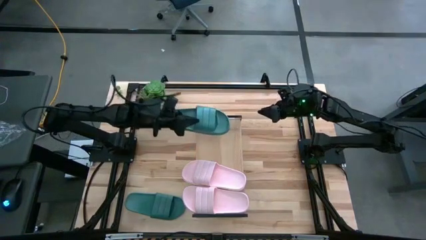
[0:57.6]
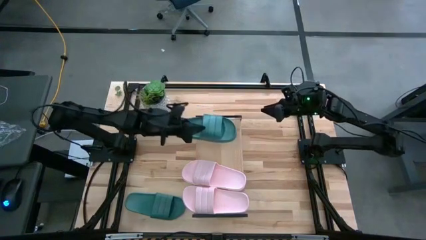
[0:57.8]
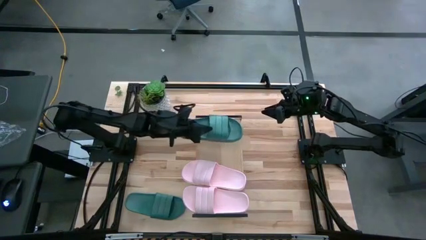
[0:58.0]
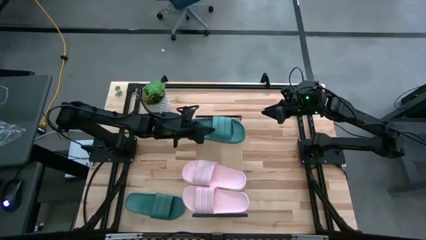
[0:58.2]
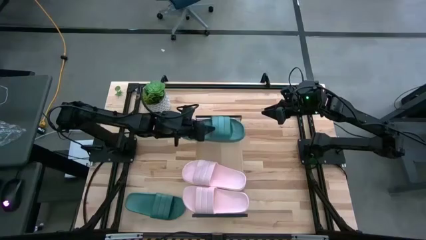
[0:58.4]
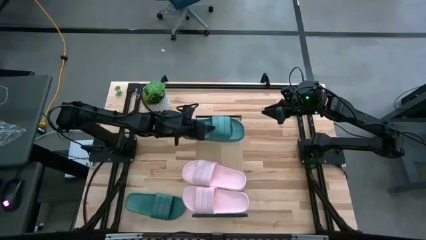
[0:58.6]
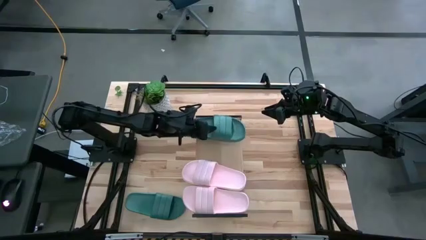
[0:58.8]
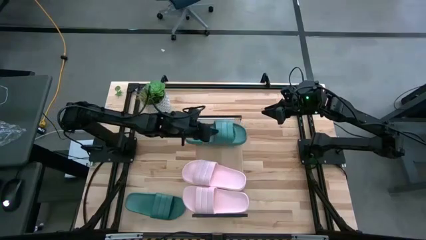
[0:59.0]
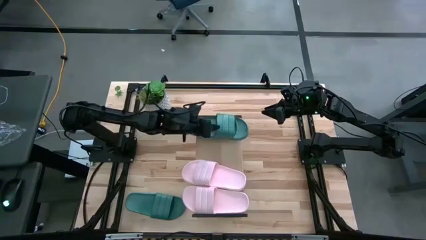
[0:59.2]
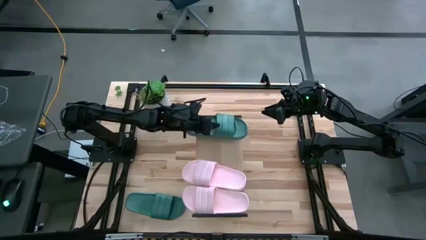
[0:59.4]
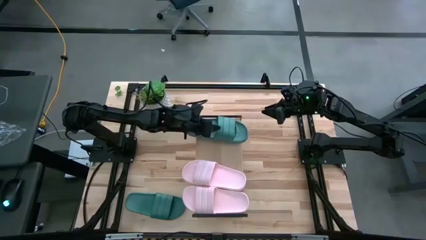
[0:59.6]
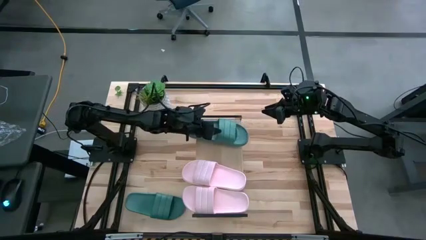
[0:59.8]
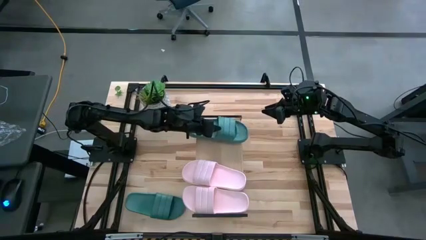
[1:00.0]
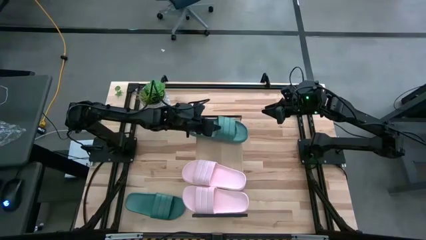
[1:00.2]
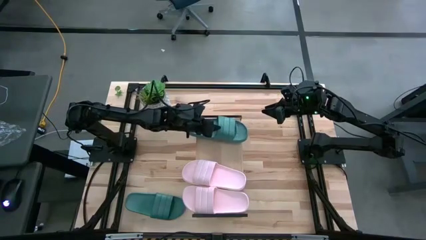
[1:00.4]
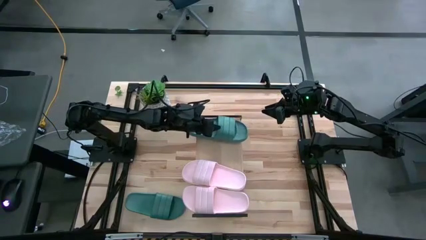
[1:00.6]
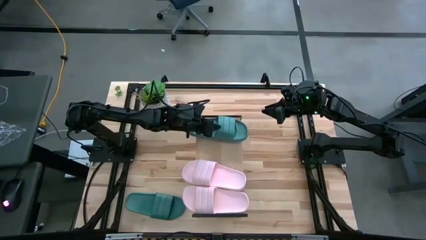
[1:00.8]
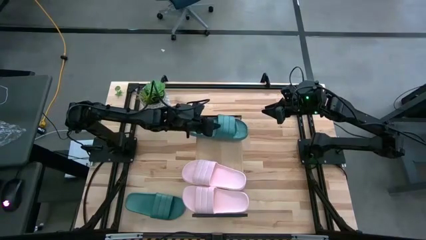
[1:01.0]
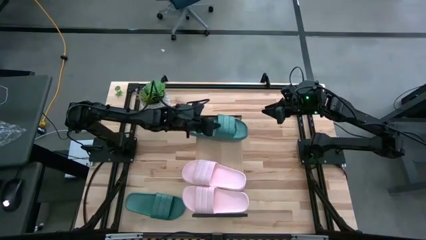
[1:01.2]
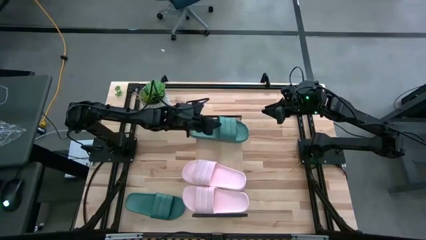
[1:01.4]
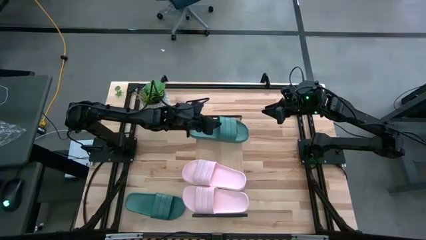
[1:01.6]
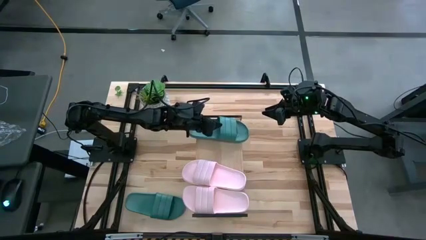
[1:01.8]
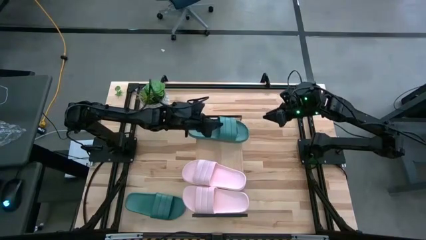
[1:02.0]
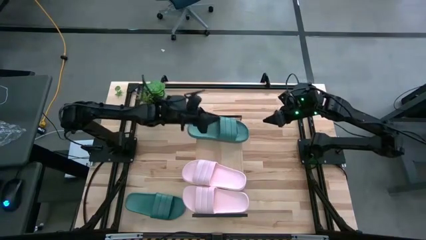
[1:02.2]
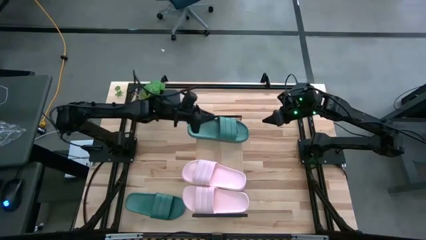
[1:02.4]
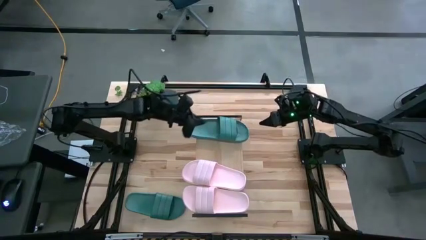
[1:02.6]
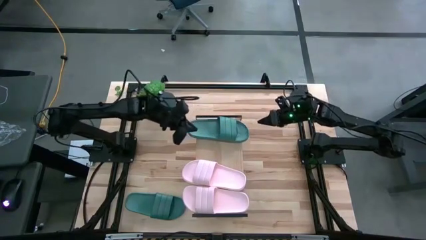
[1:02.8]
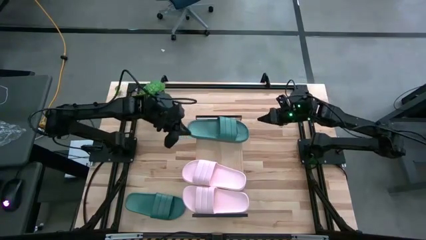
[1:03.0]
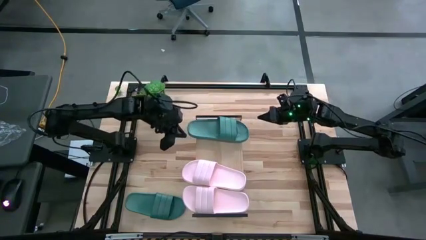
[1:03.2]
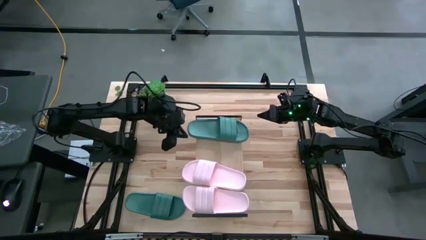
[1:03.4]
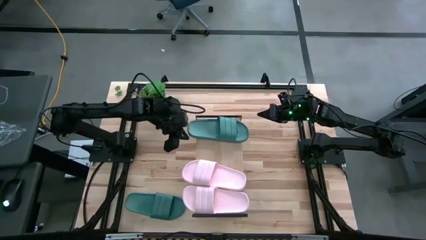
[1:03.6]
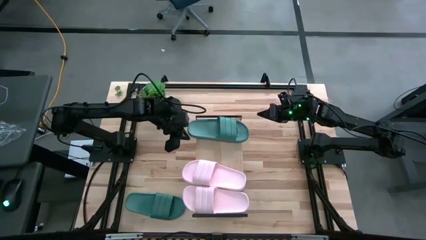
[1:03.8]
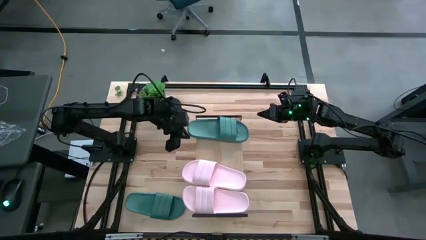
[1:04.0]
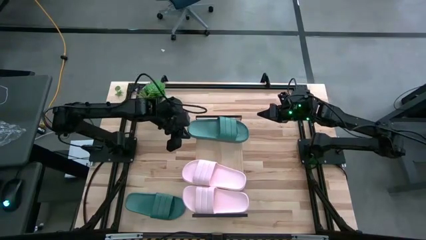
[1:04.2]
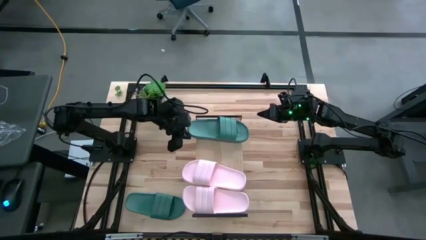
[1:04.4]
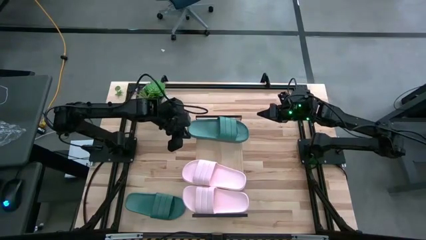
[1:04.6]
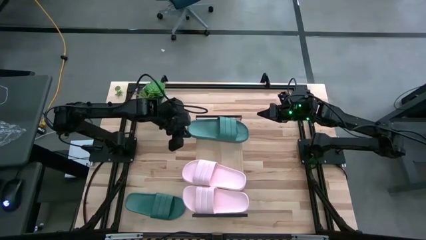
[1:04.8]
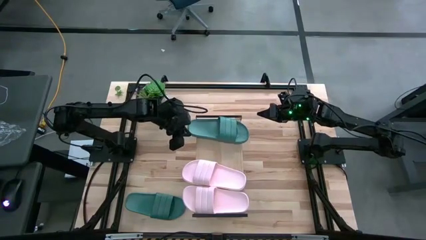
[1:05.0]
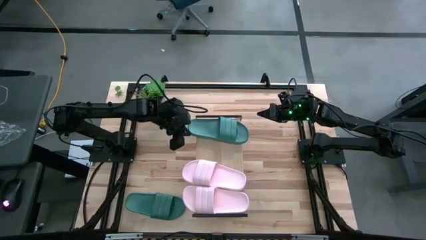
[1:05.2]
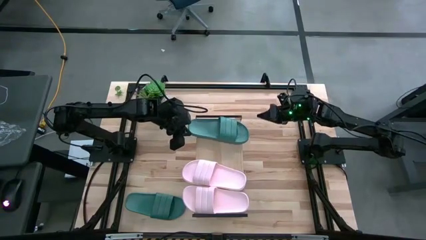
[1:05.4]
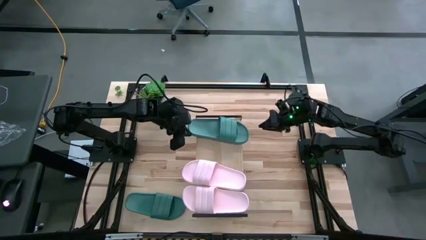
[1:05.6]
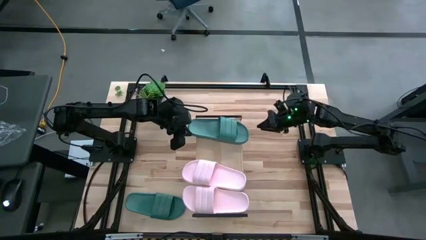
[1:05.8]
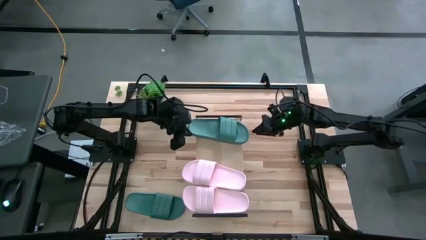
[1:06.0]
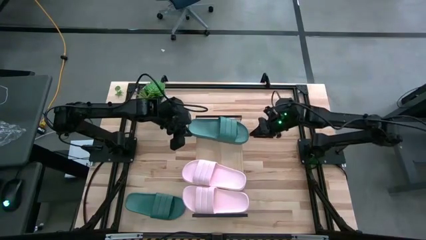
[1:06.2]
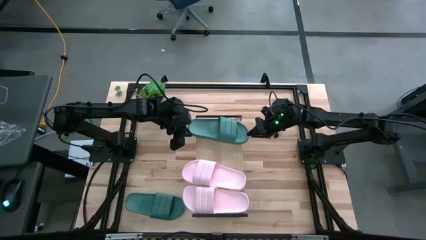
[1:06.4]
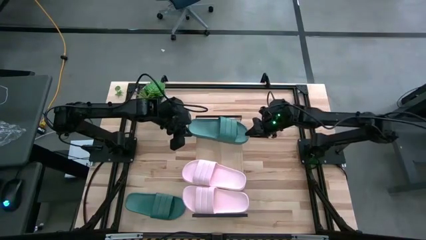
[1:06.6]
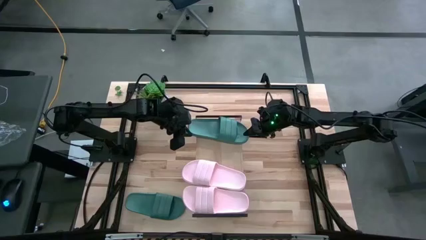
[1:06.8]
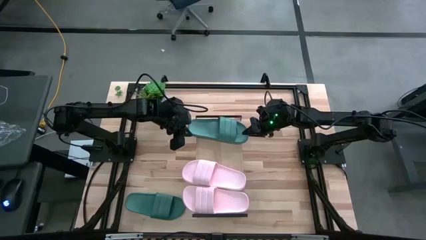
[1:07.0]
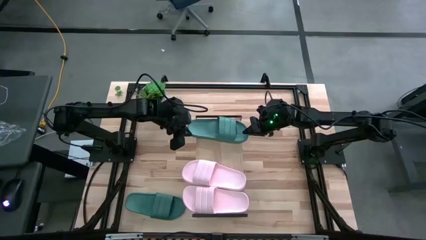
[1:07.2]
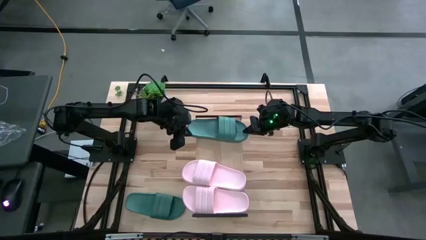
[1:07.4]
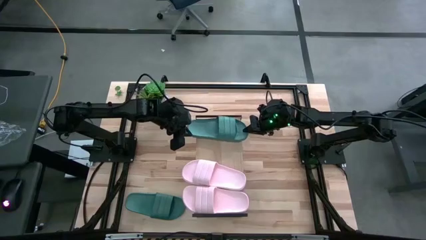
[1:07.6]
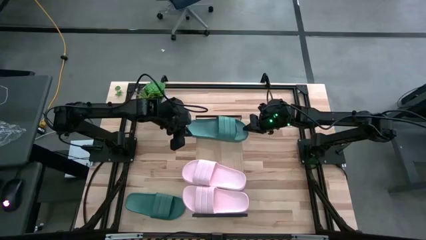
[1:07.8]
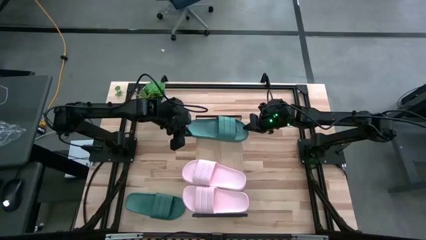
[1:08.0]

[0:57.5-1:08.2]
Task: Pick and place slides into the shelf
Put the top green slides on the shelf
